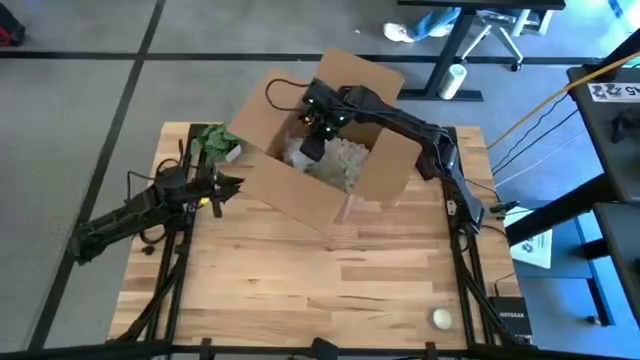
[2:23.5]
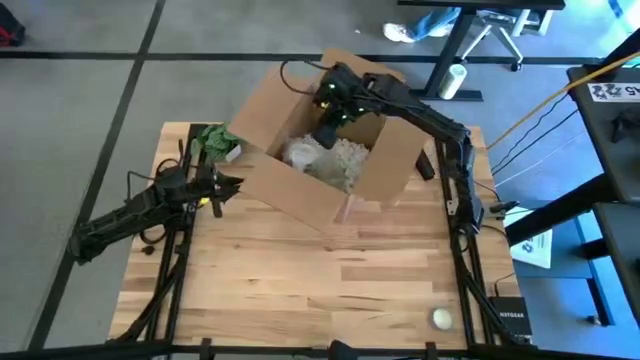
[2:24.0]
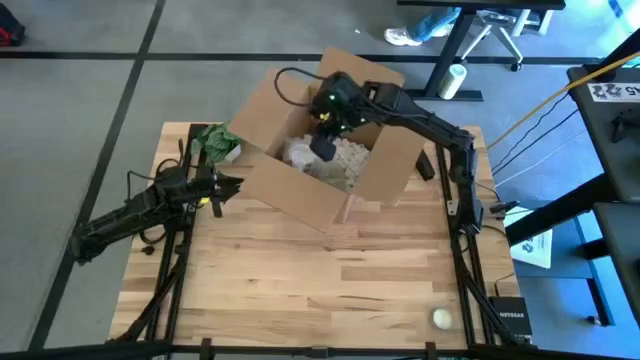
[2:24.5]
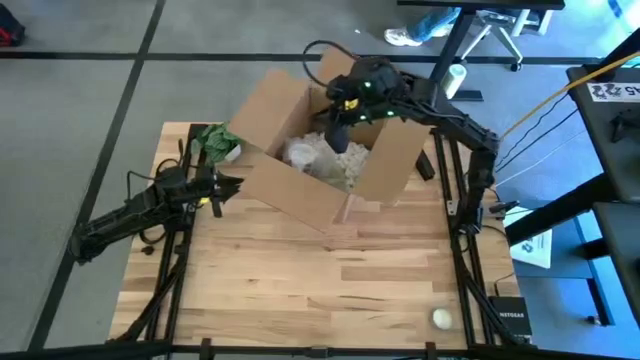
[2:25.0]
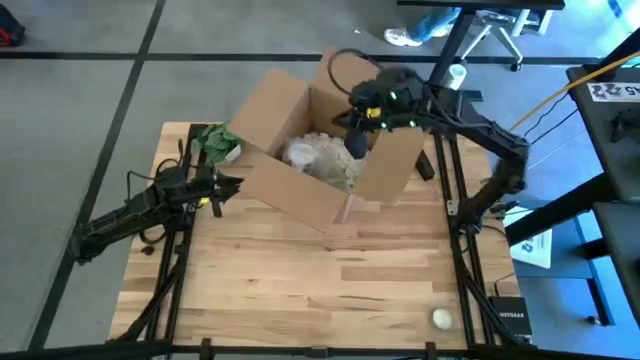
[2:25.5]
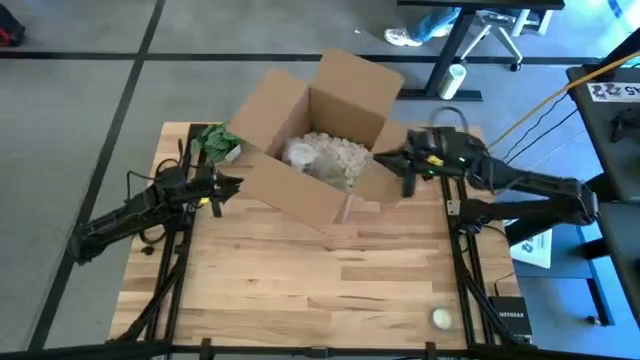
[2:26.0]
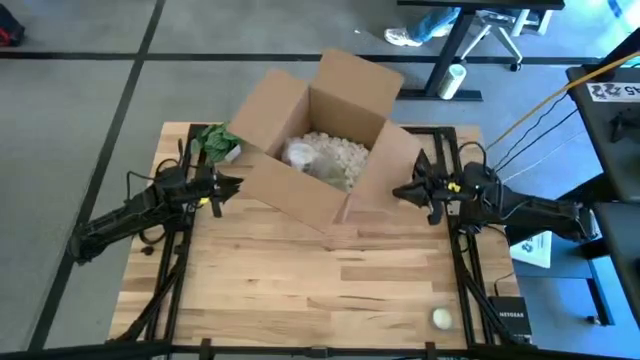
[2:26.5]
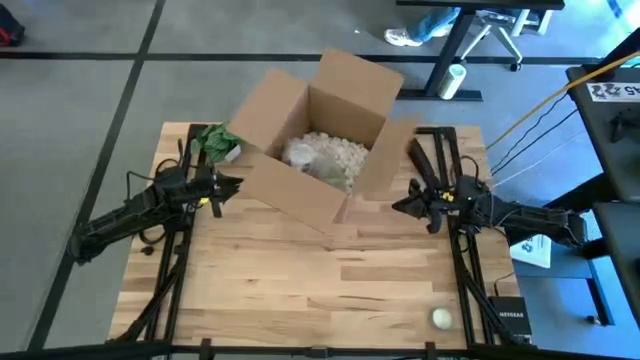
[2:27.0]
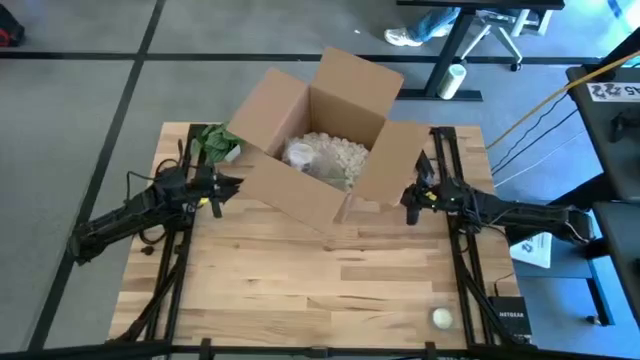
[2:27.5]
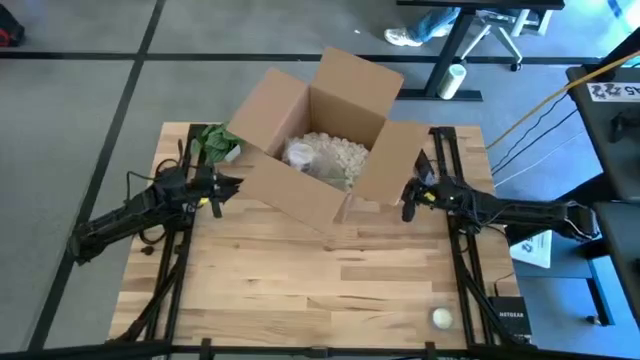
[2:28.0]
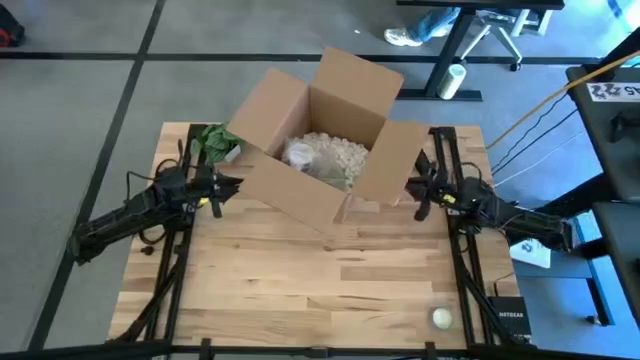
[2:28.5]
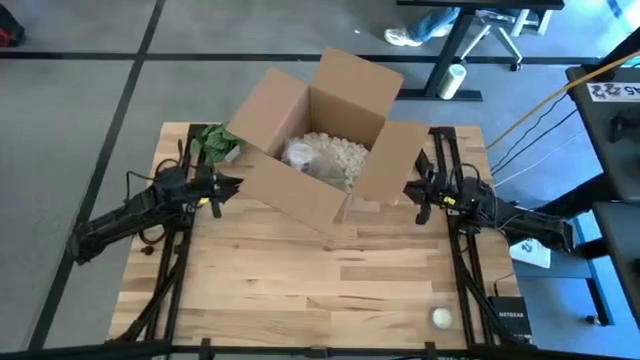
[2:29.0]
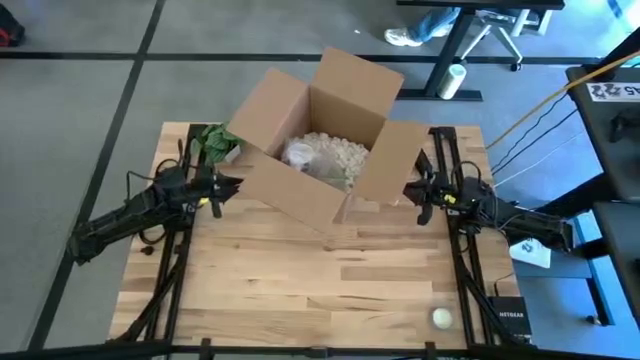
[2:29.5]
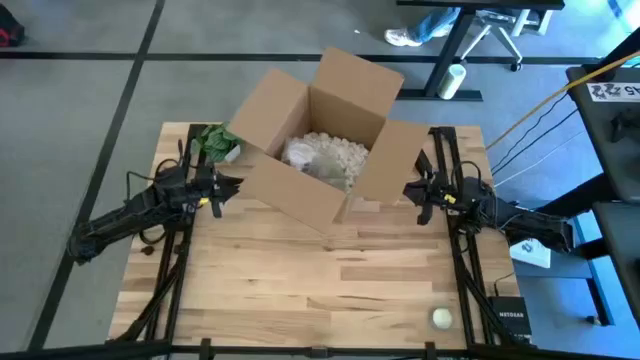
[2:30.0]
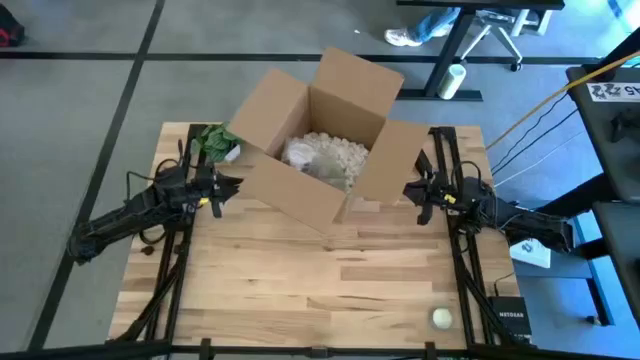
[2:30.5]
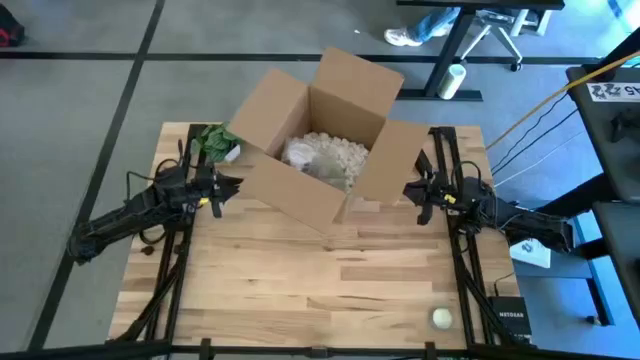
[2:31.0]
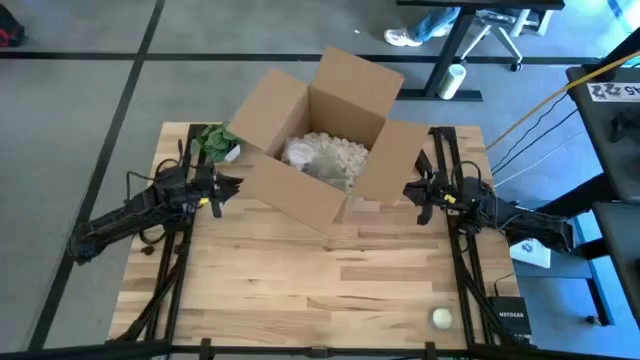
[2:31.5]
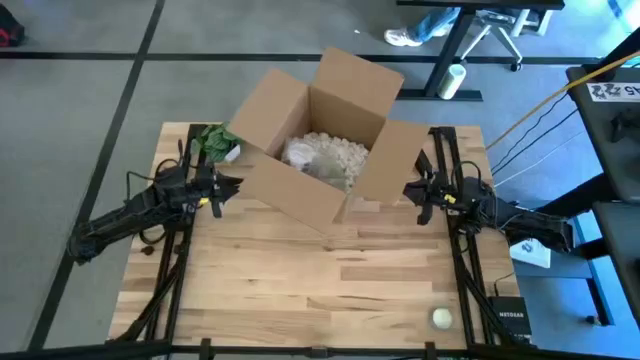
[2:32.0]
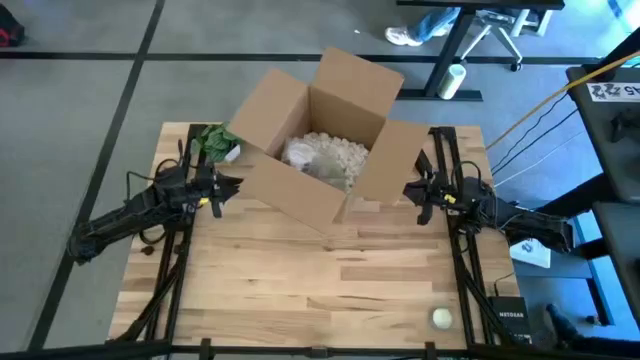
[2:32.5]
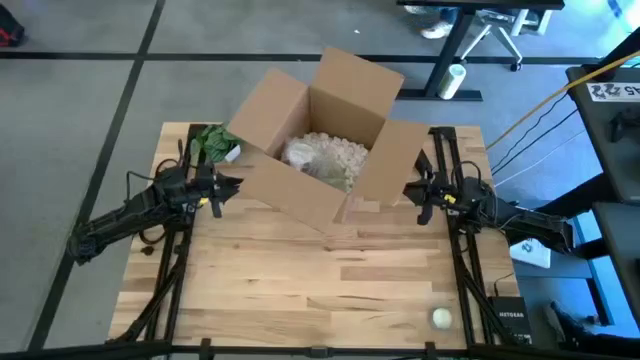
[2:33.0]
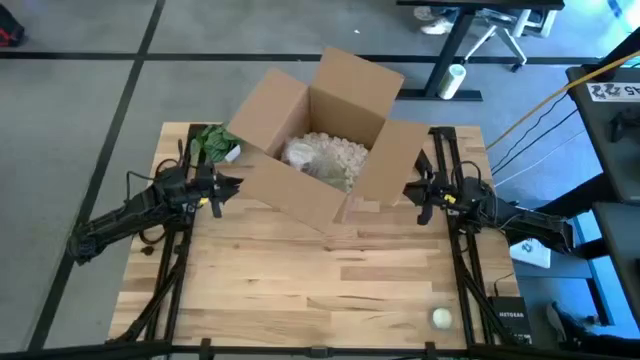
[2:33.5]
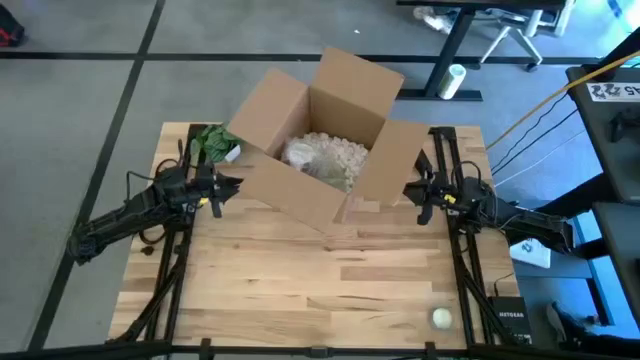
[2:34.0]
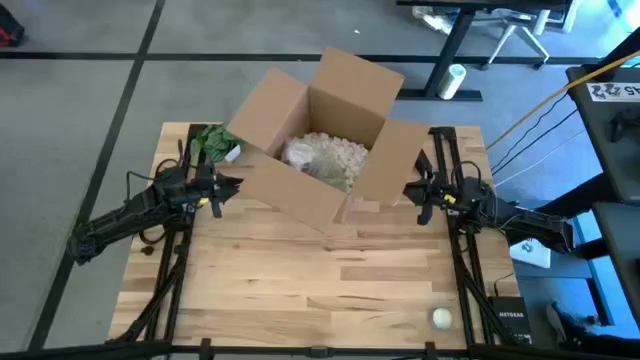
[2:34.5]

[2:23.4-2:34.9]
Task: wrap mug
Return to Home Position

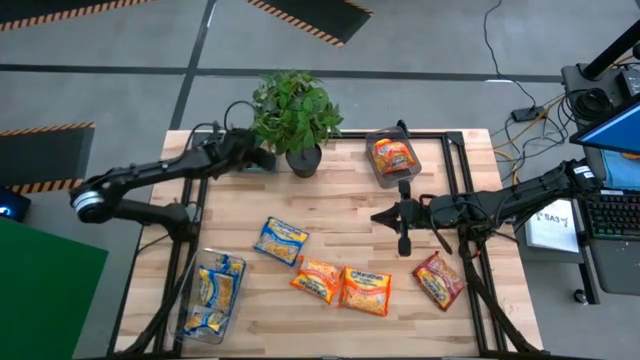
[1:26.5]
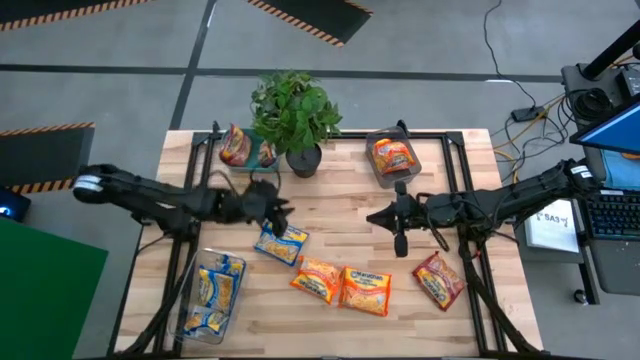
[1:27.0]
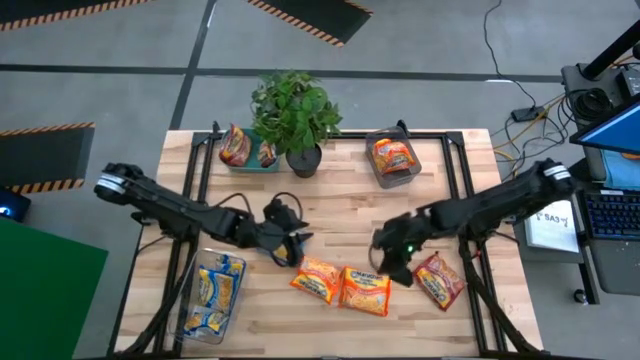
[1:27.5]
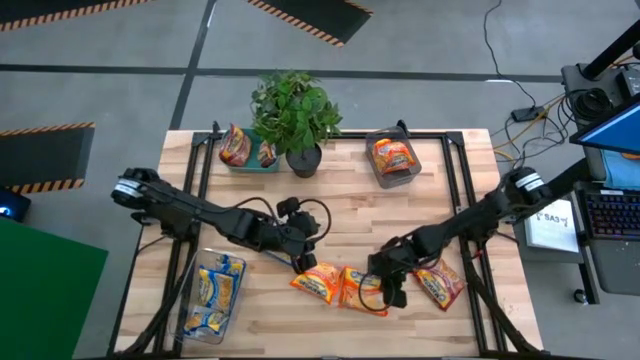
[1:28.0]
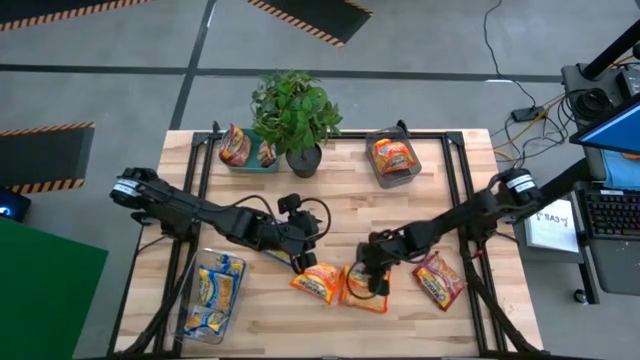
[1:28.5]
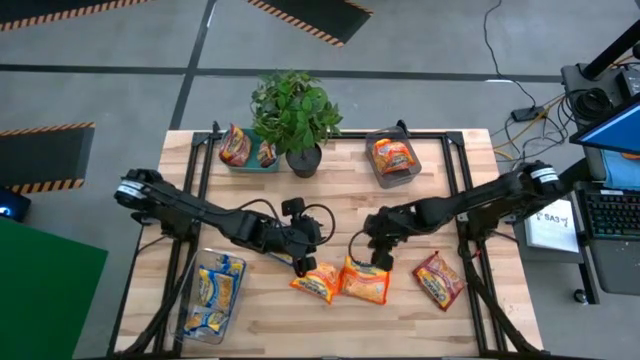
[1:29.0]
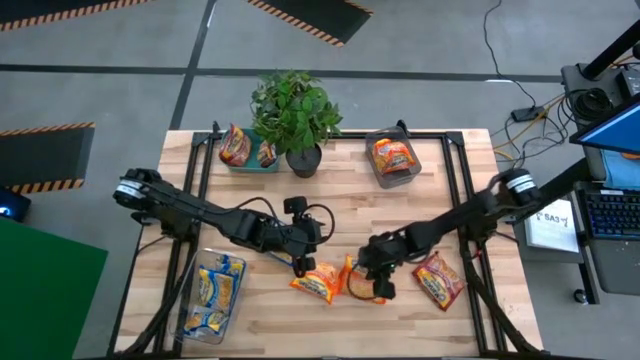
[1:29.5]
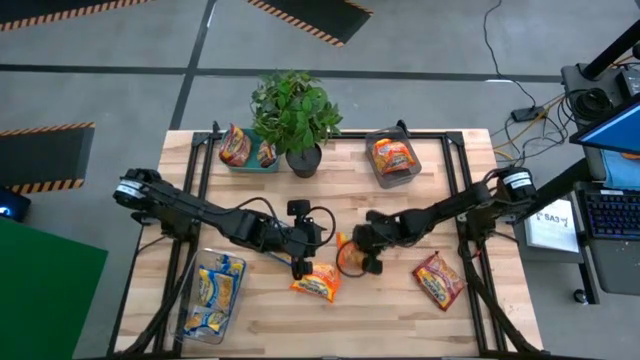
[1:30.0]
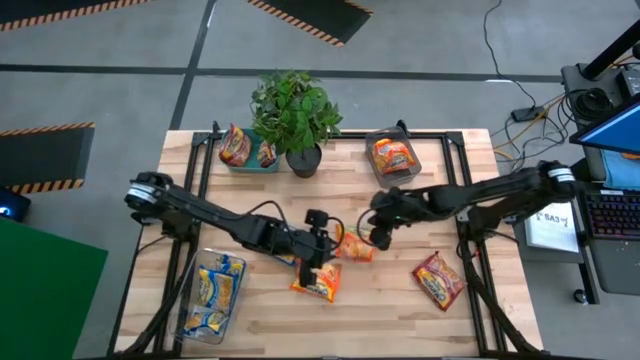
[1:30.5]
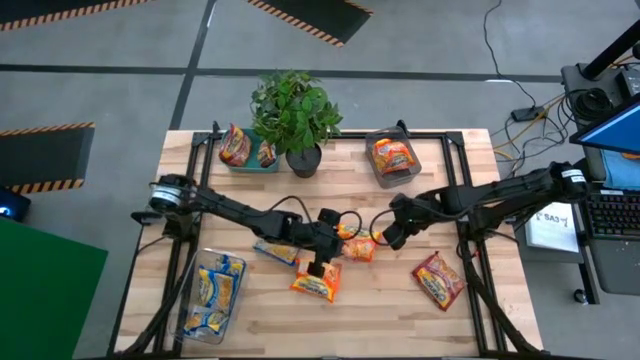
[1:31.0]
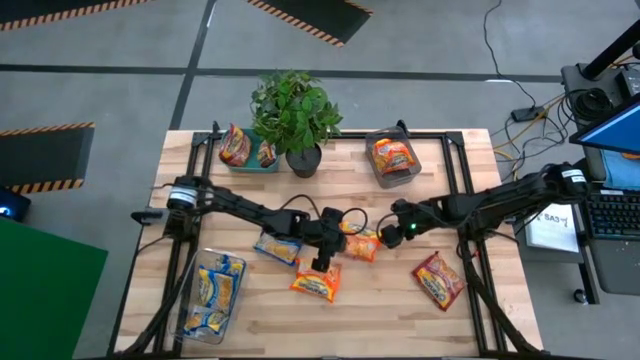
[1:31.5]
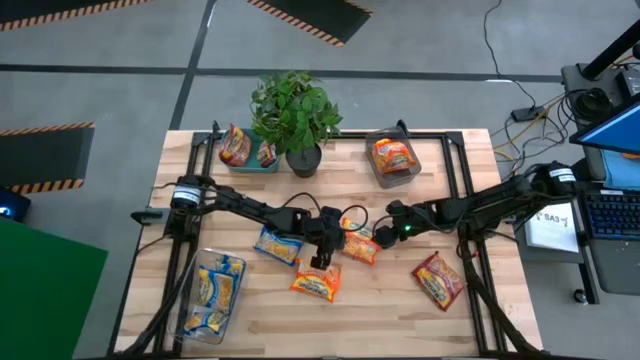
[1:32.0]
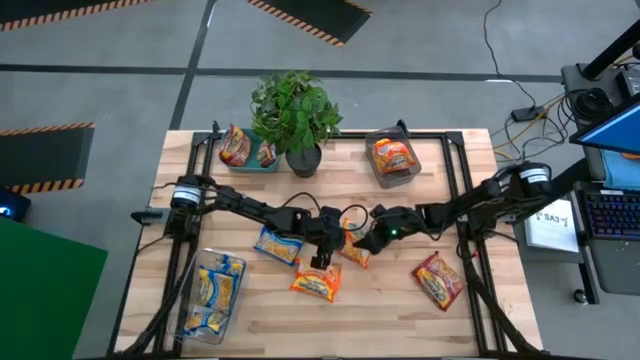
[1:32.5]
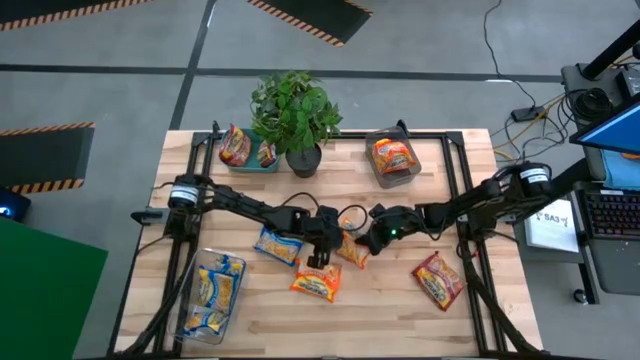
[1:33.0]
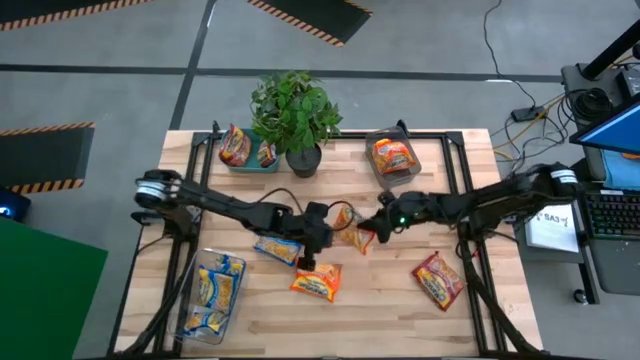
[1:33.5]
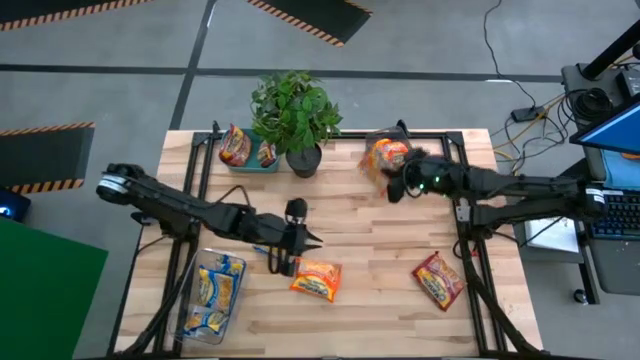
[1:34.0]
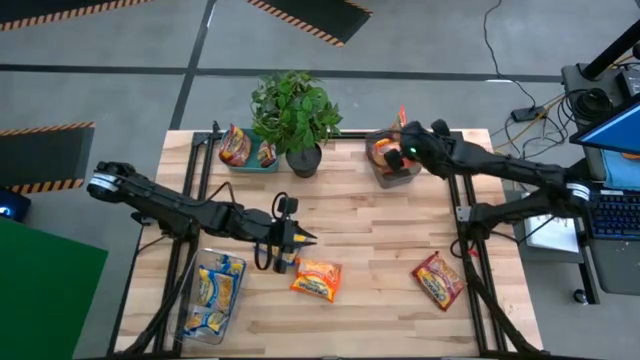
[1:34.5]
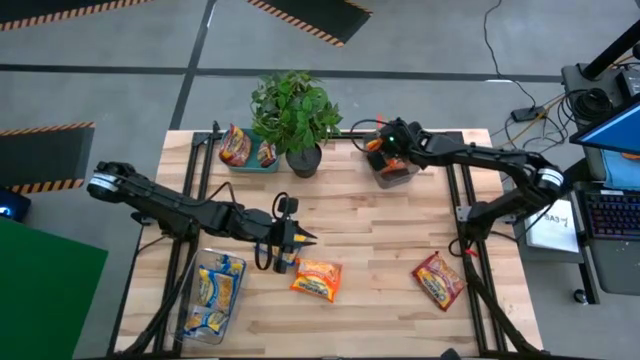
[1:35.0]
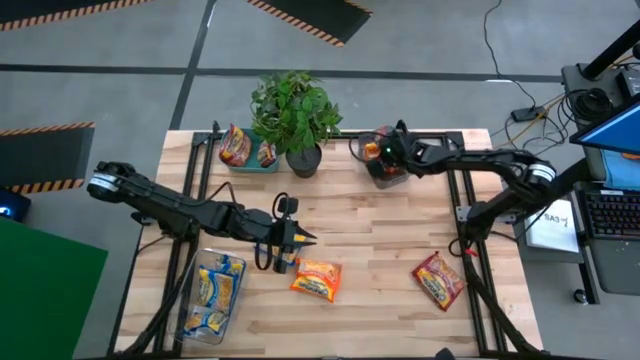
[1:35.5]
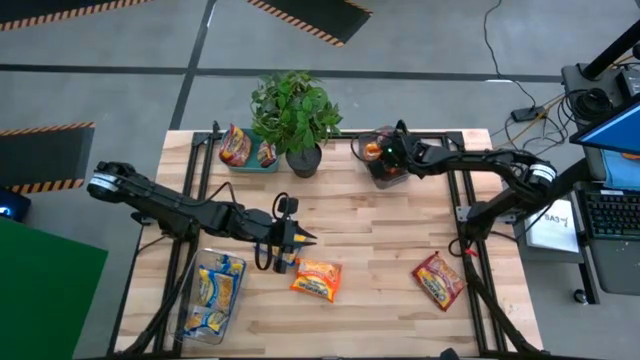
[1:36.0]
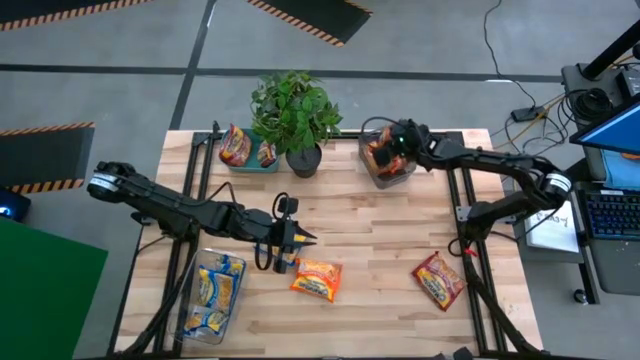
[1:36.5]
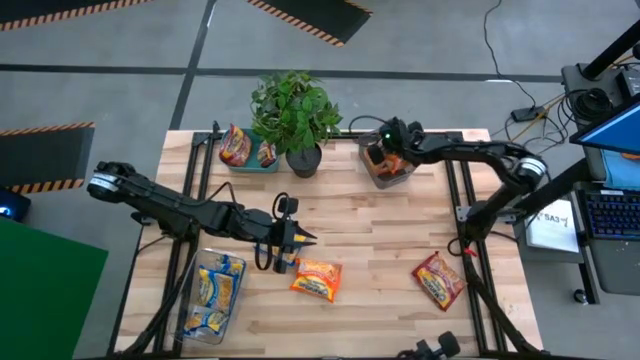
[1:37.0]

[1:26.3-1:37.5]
Task: Sort Maruchan noodles
Put the orange noodle pack into the black bin
